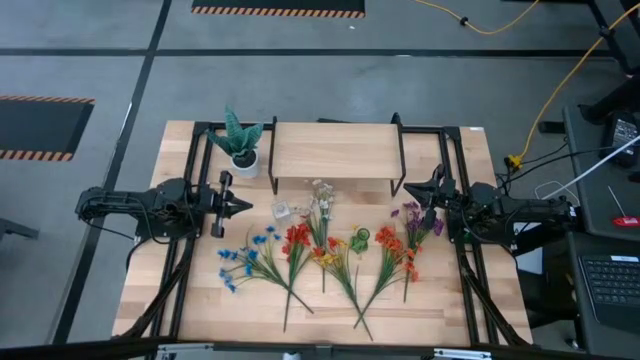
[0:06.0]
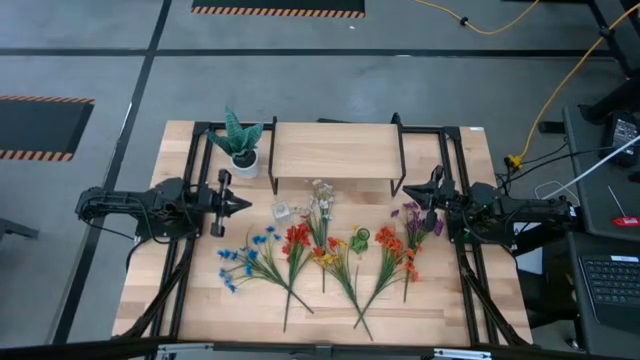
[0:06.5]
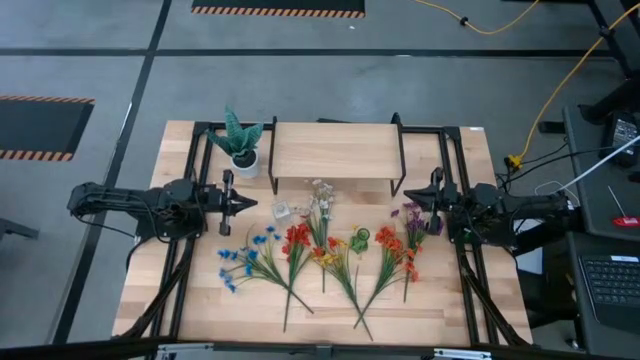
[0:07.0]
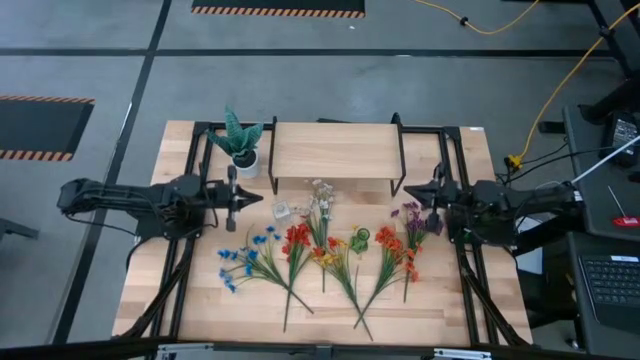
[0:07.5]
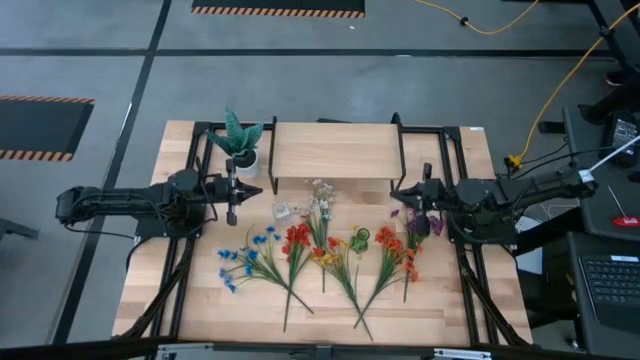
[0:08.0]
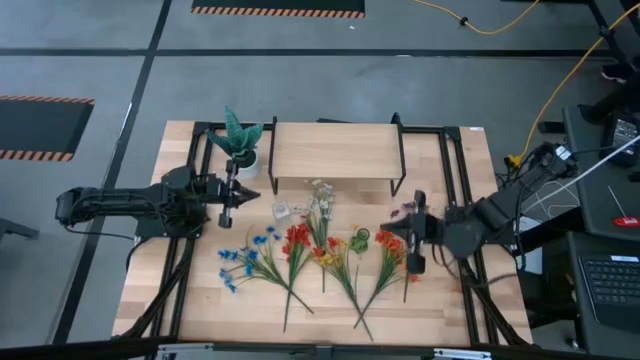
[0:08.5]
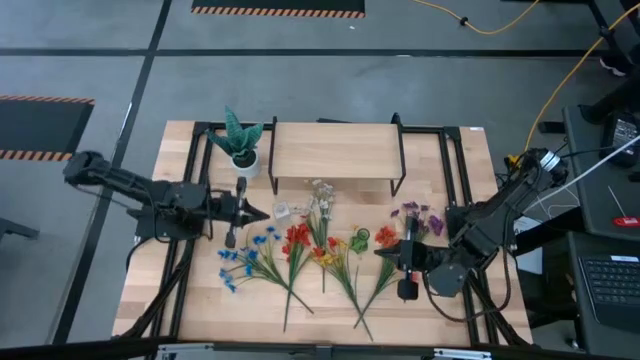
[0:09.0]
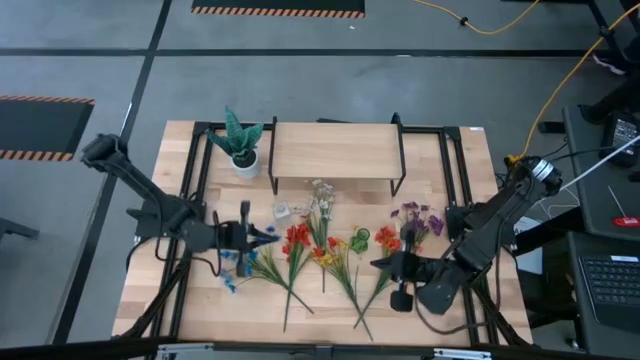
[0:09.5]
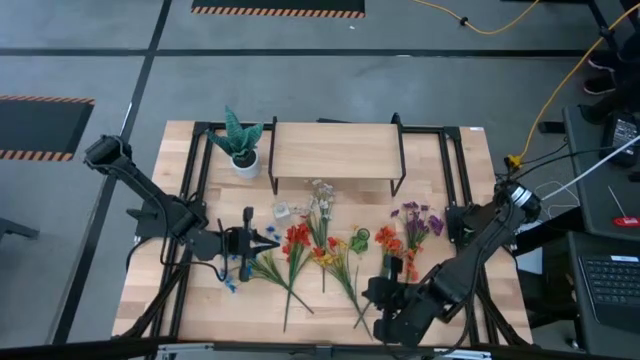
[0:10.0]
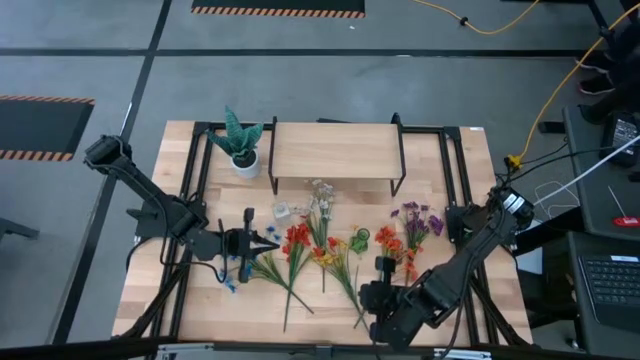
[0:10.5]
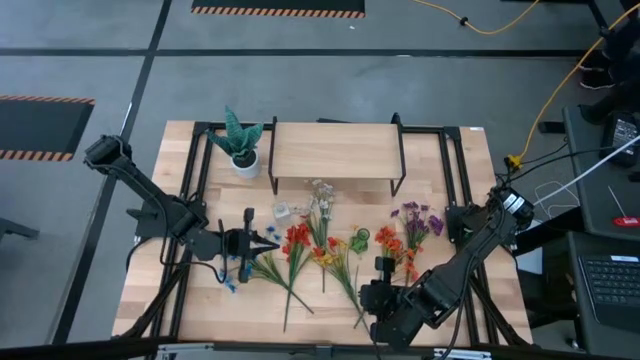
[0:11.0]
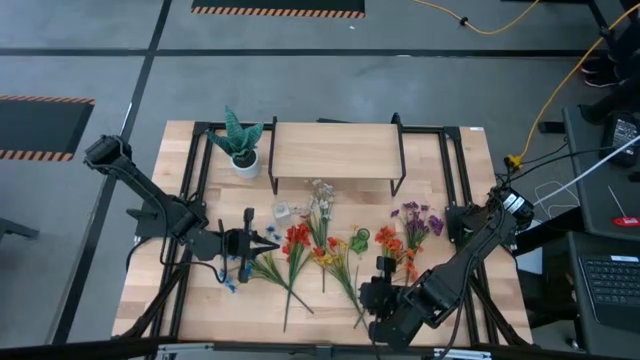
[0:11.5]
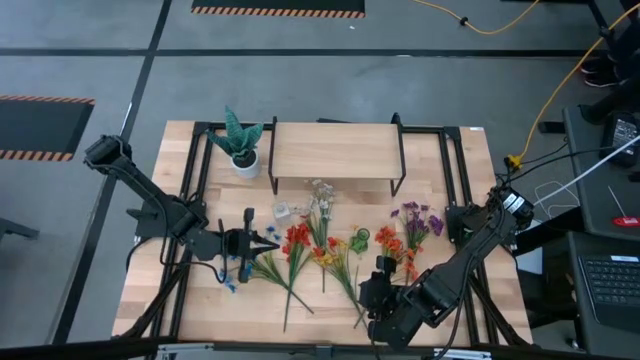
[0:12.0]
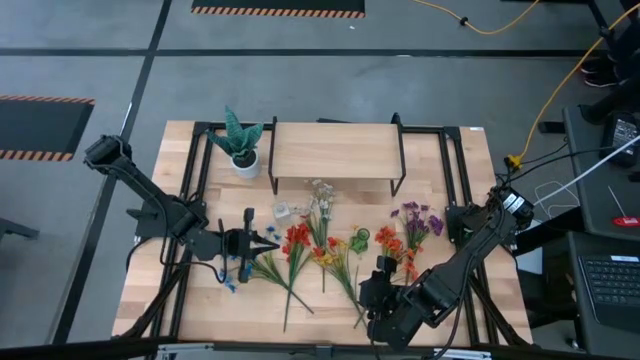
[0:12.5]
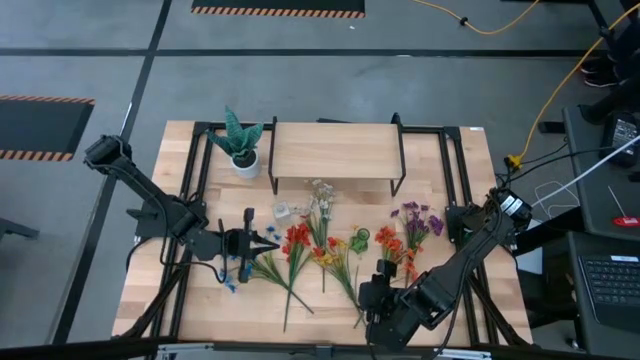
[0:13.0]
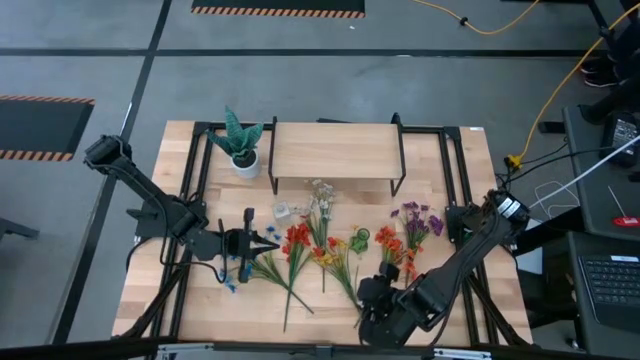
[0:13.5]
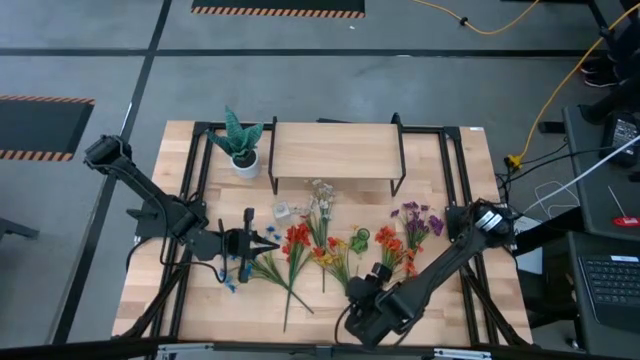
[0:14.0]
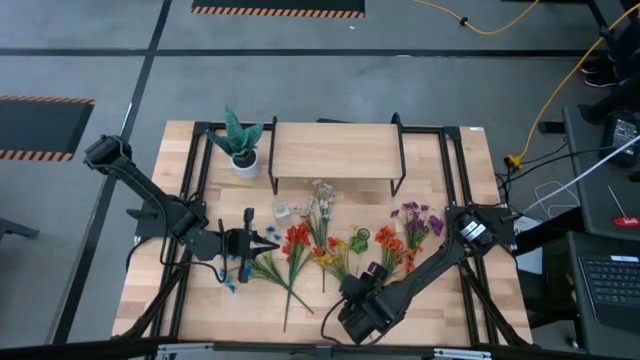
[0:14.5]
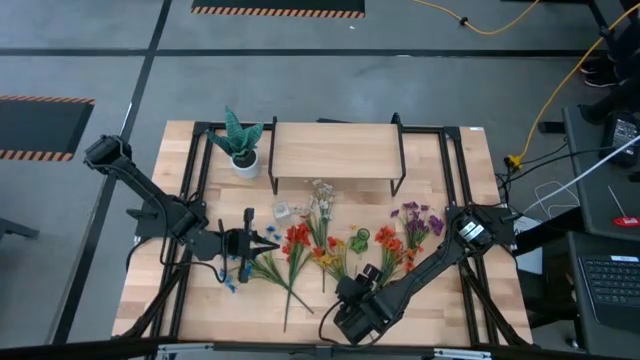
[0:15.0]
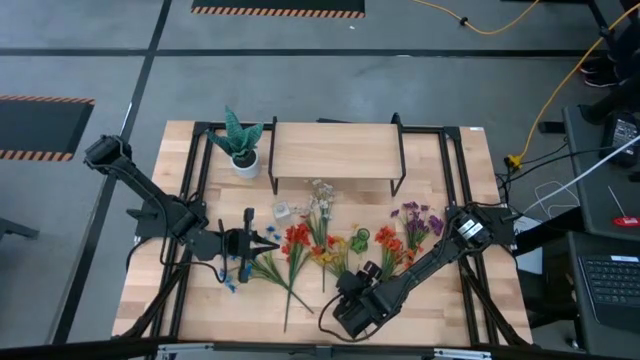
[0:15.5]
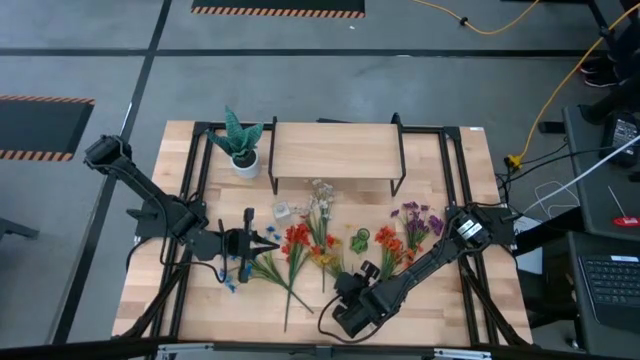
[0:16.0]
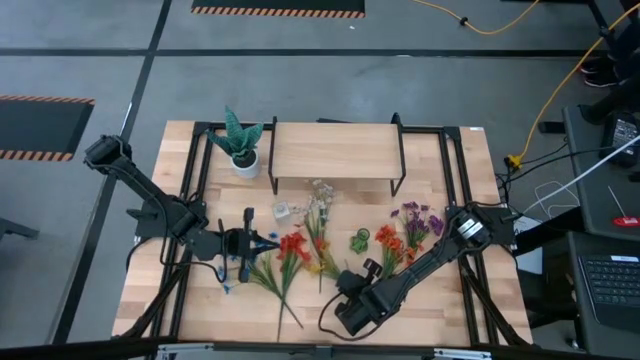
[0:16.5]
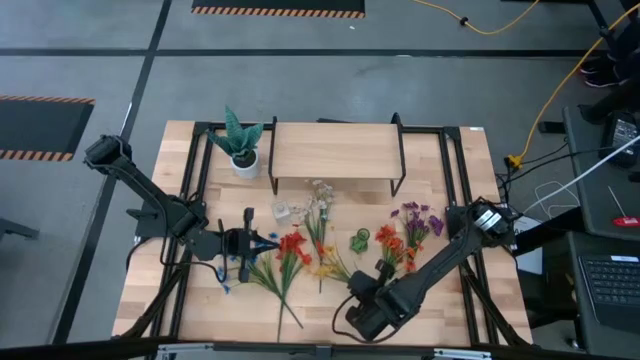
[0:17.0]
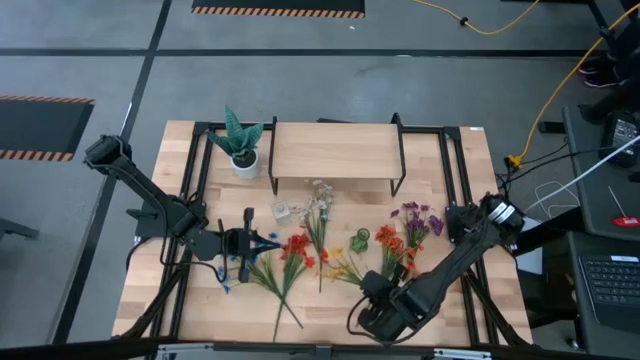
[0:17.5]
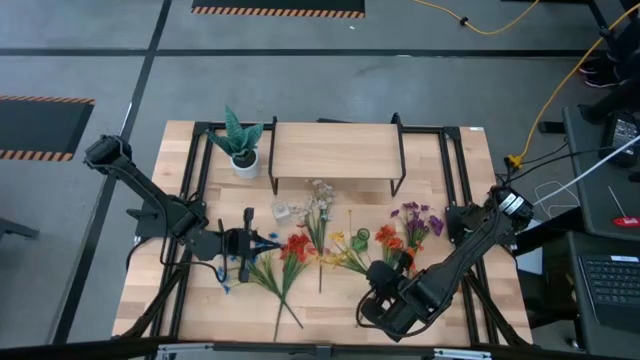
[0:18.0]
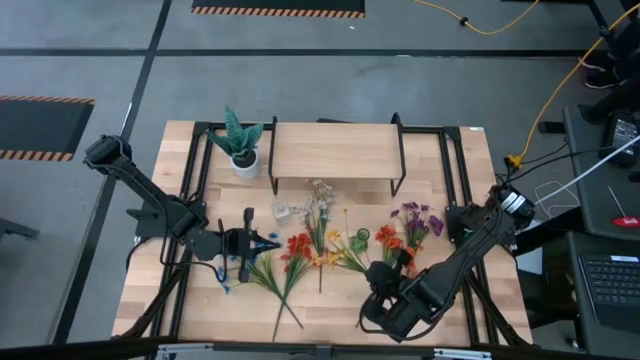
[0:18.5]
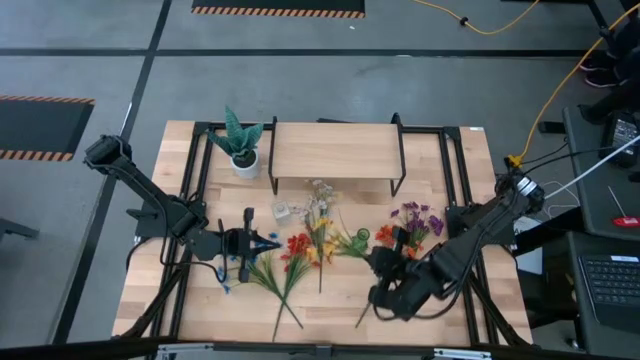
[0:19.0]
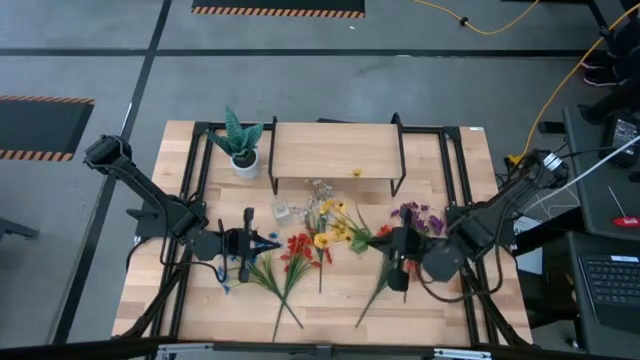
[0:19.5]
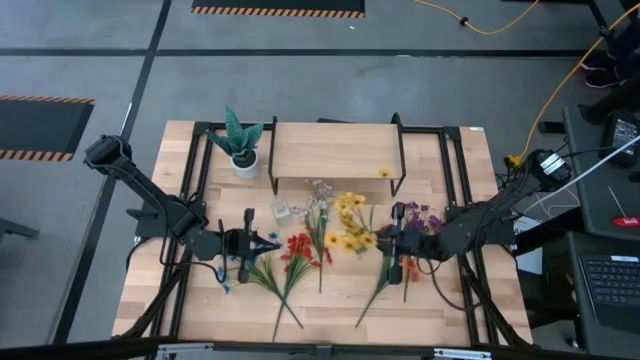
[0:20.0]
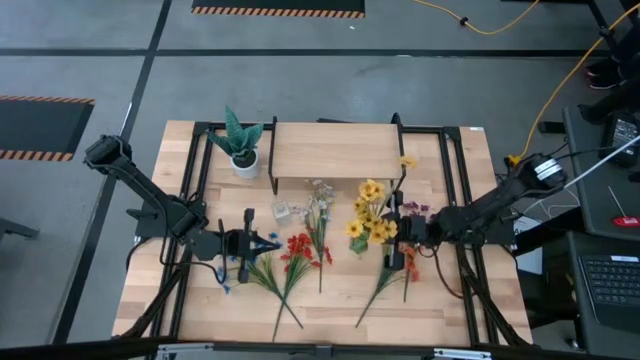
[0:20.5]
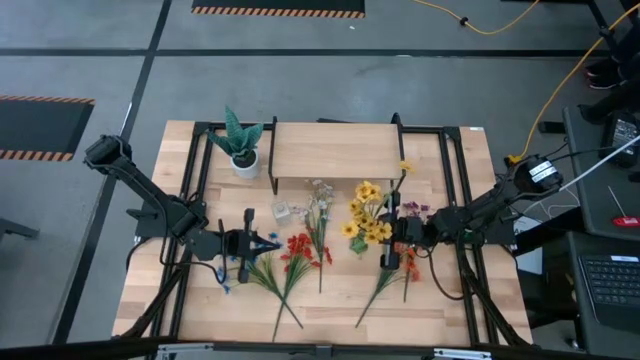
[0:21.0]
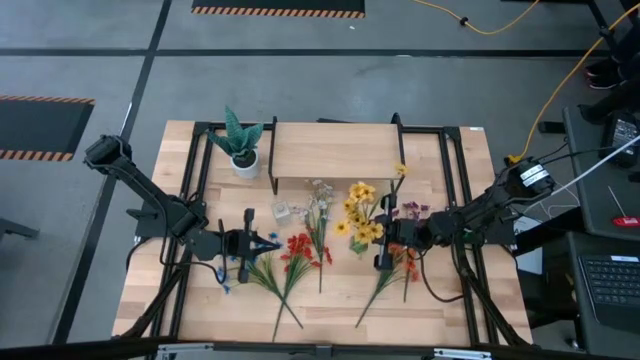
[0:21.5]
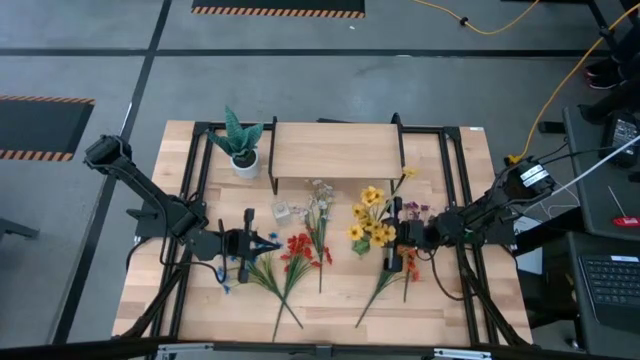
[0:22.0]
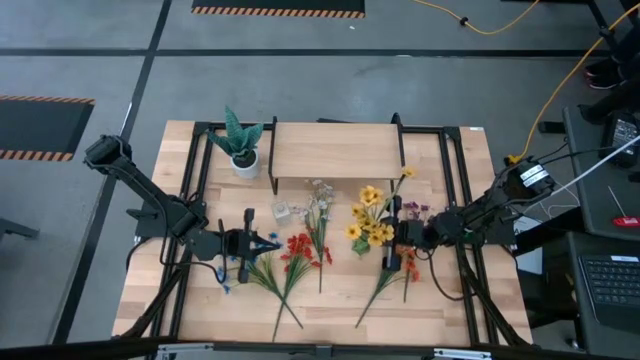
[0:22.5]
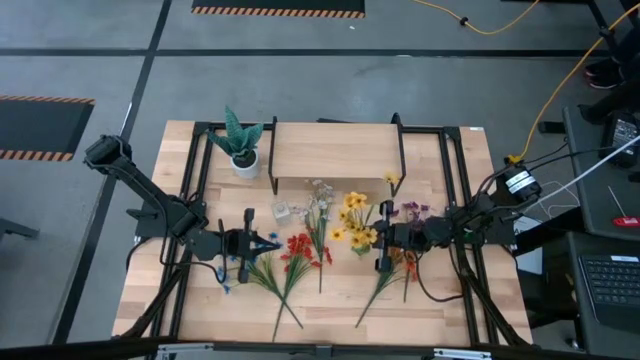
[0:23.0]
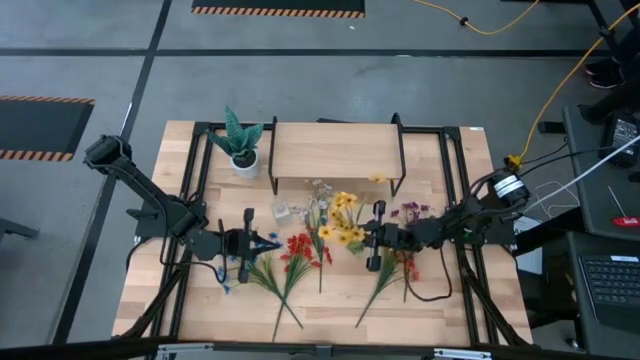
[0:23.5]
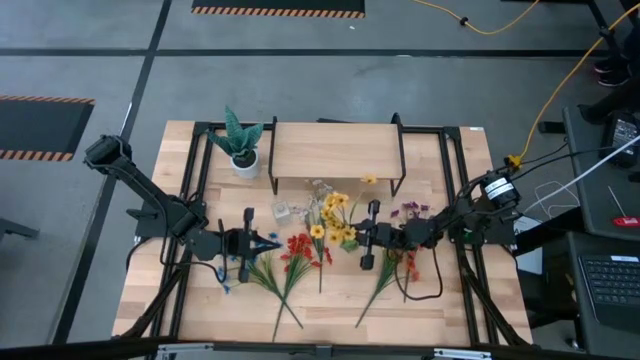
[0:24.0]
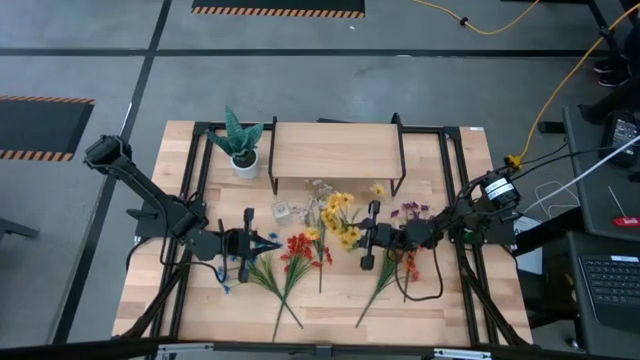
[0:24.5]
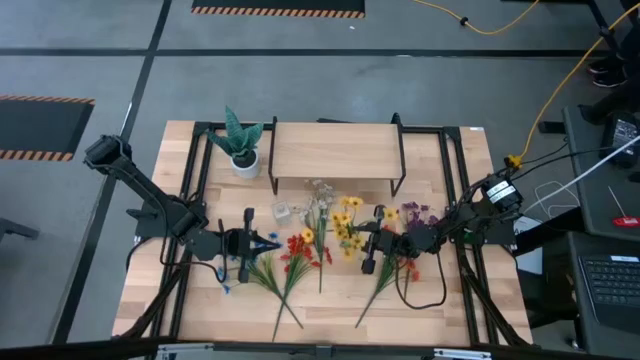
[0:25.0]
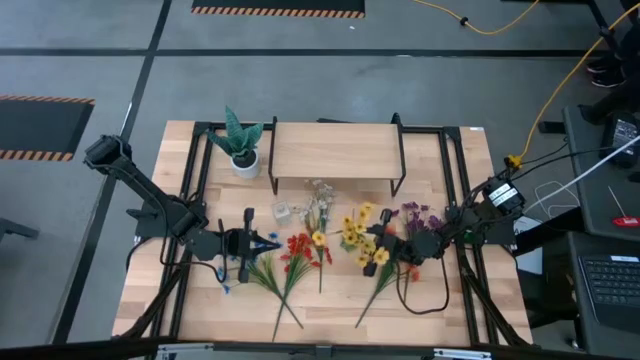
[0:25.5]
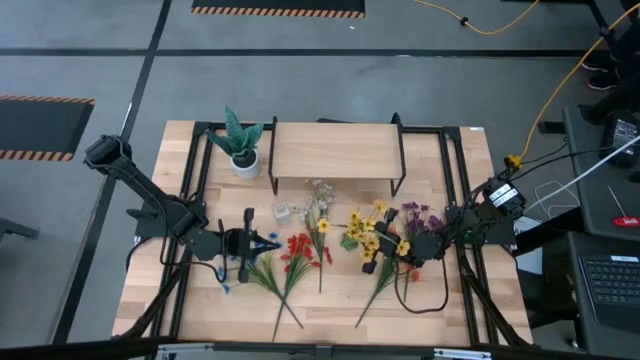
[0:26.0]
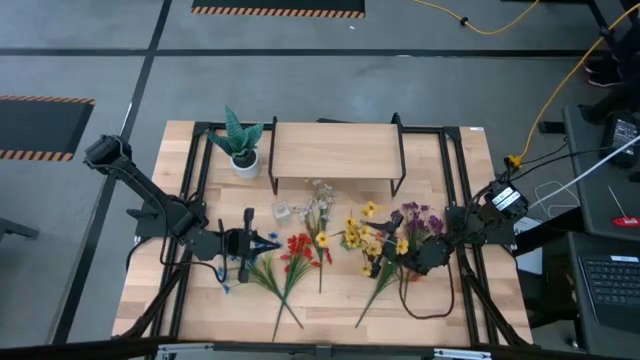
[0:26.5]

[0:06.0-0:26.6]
Task: Pick and place flowers into a vace then onto a shelf
Put the yellow flowers into the green vase
